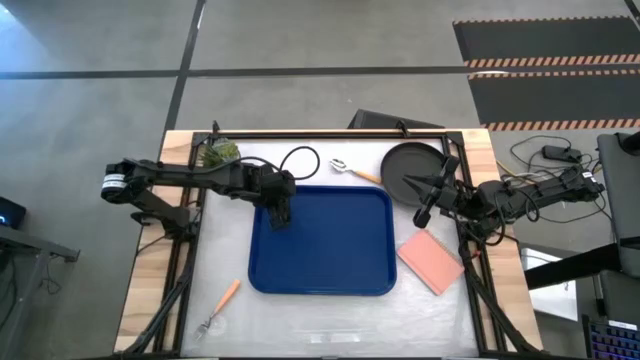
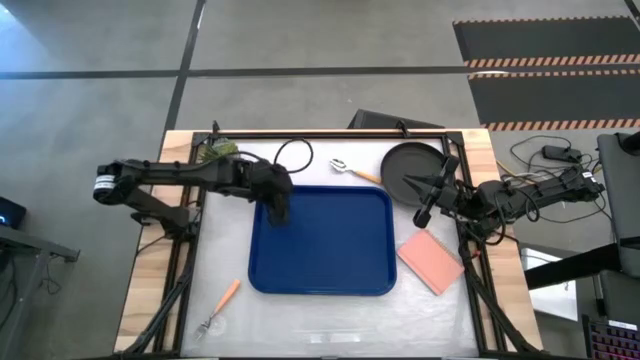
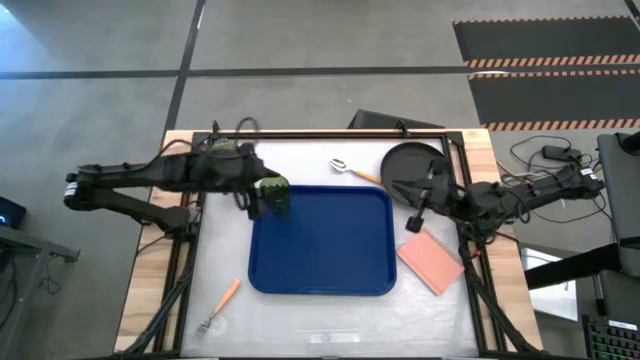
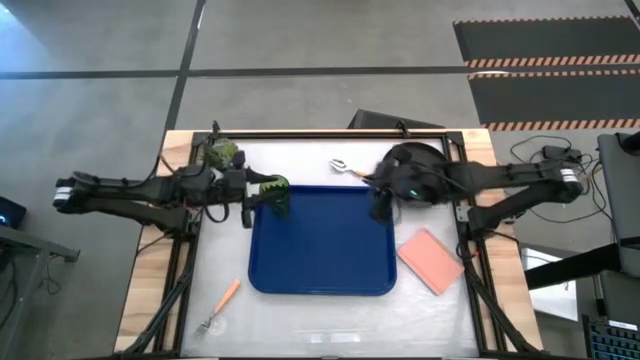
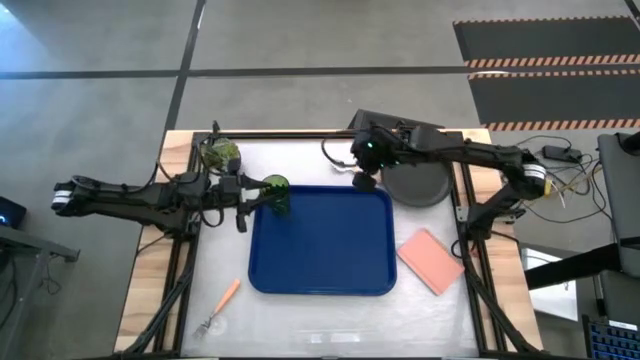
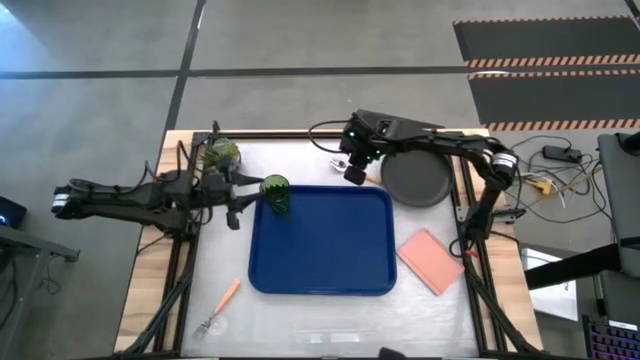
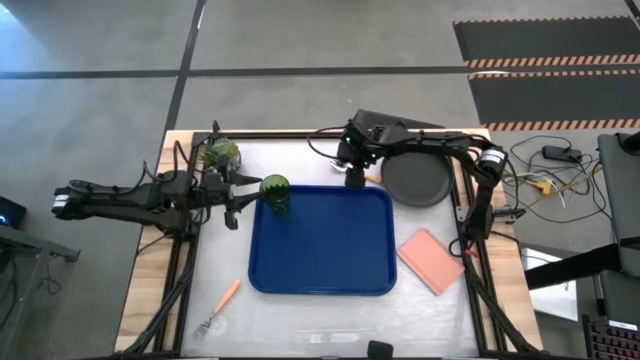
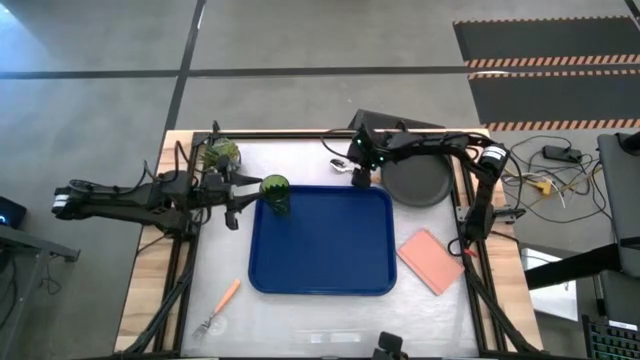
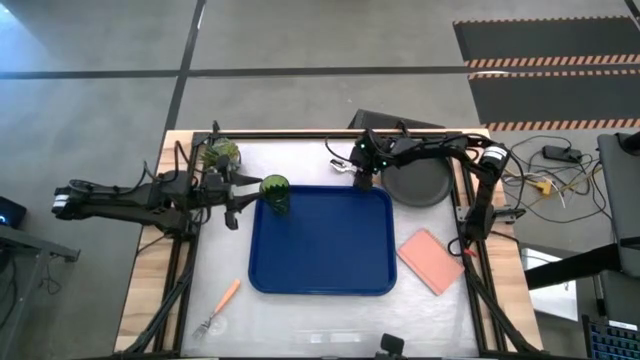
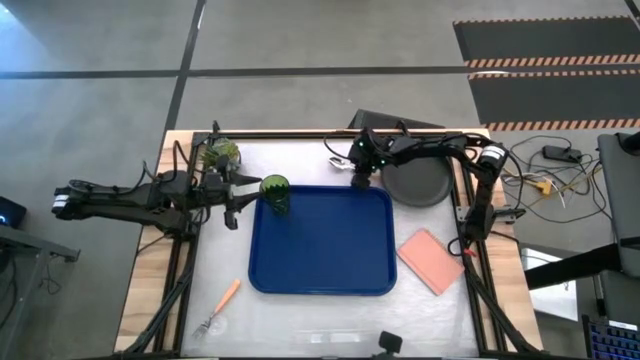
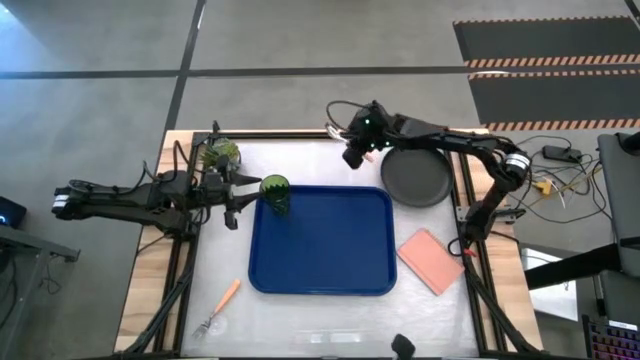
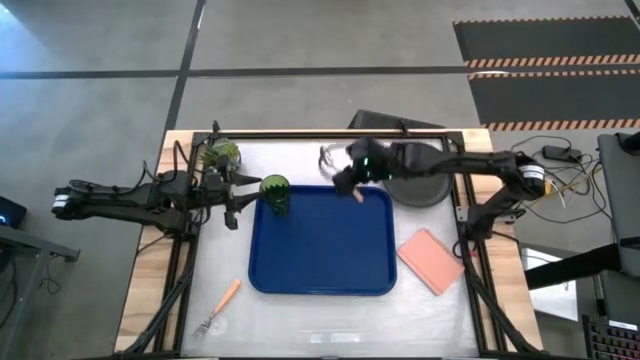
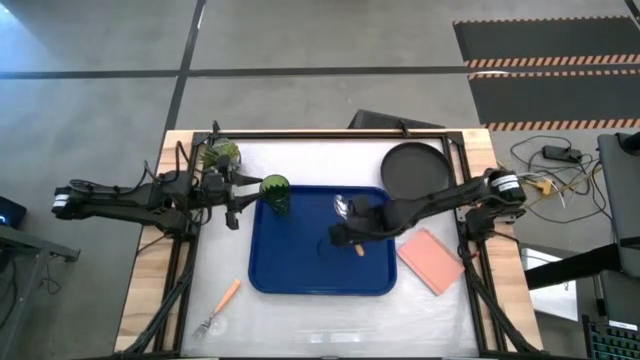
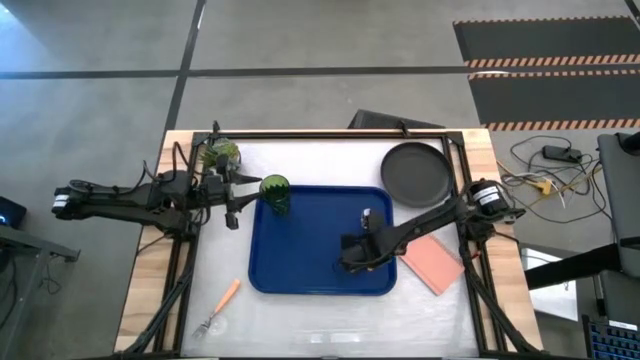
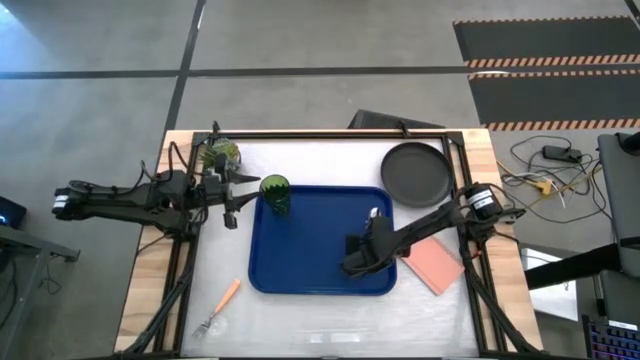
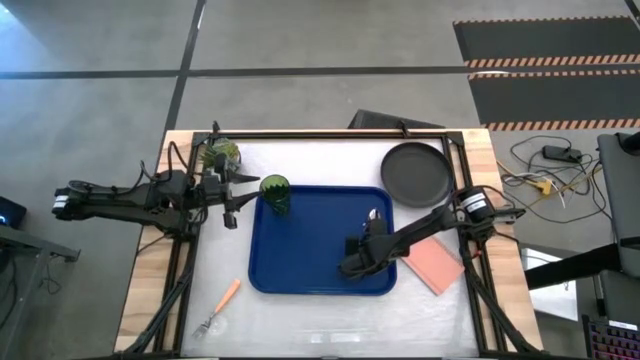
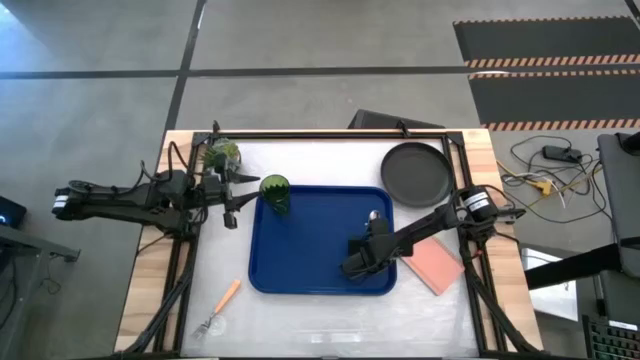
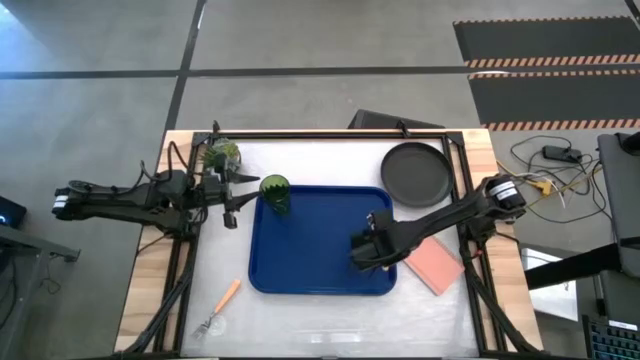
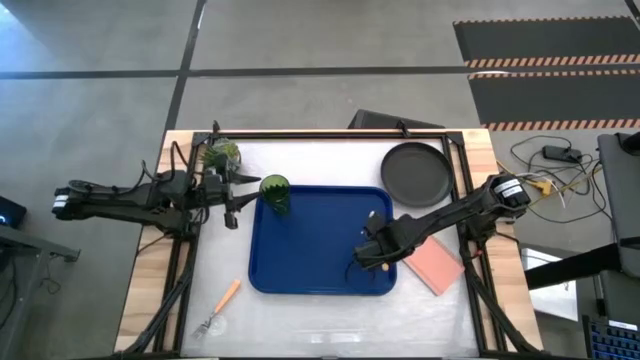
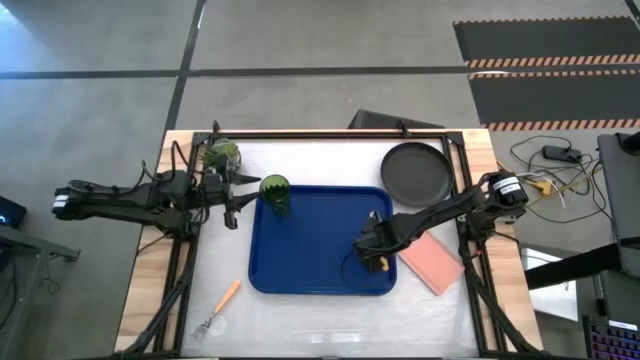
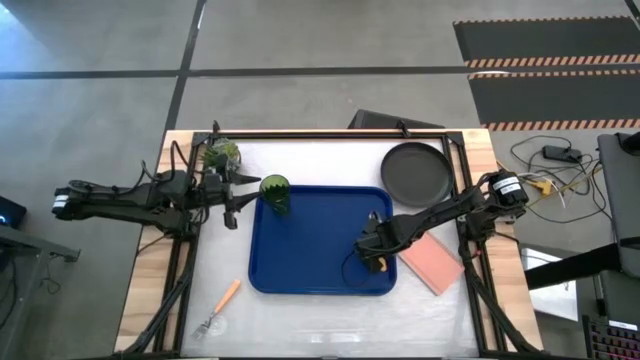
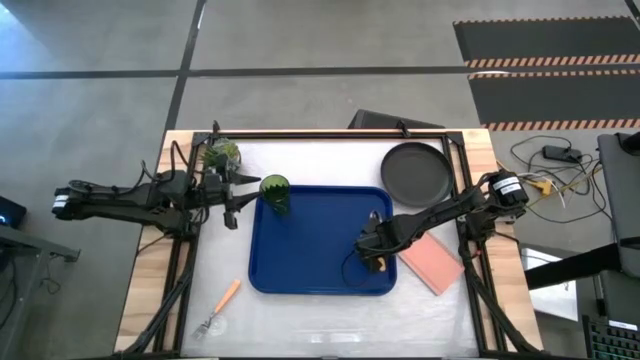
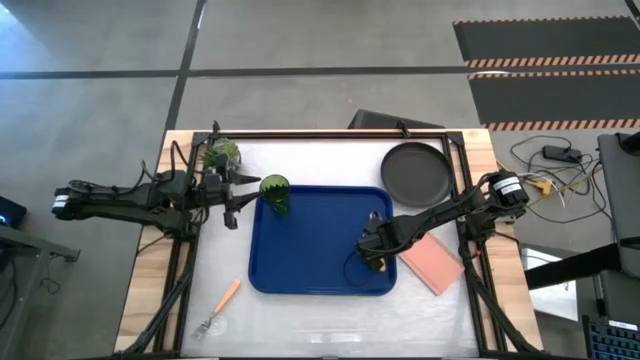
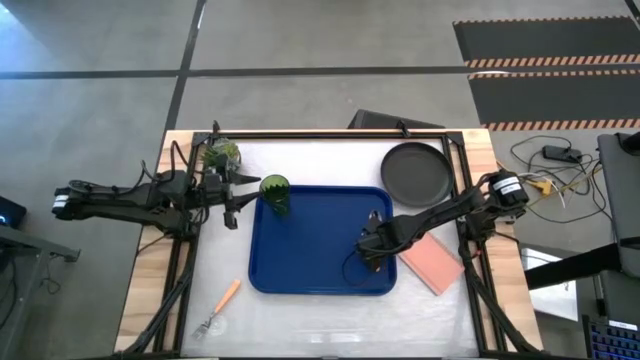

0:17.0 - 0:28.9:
Task: Pick and place plate/cup/fork/spoon on tray
Put the spoon on the blue tray

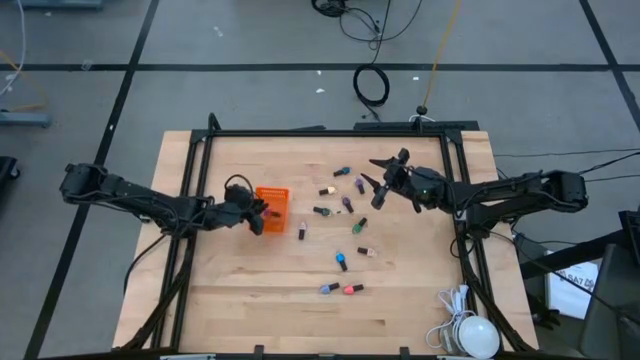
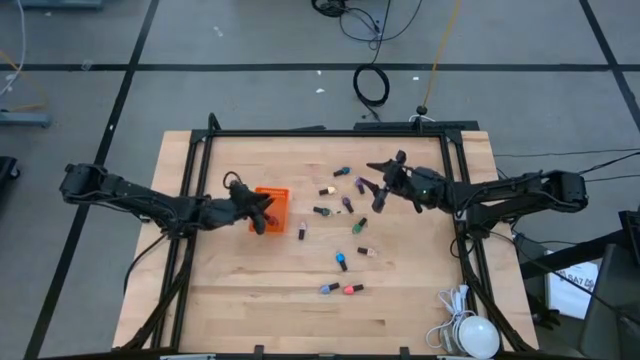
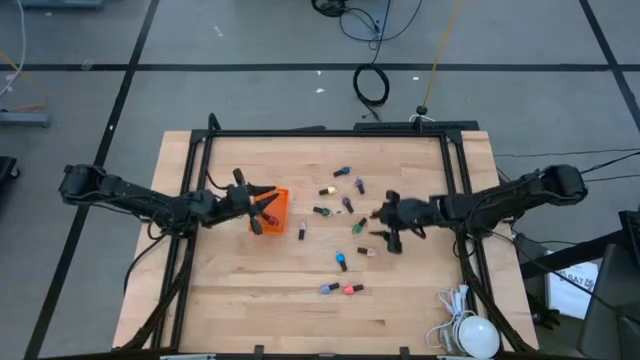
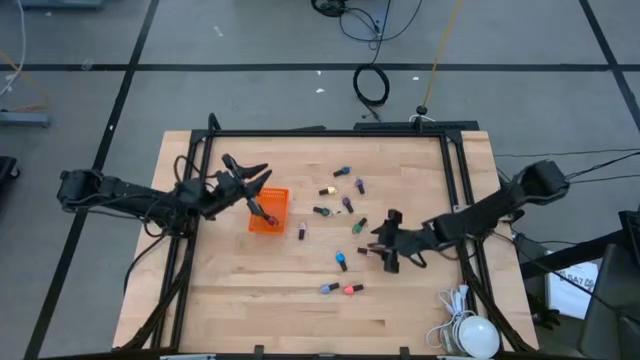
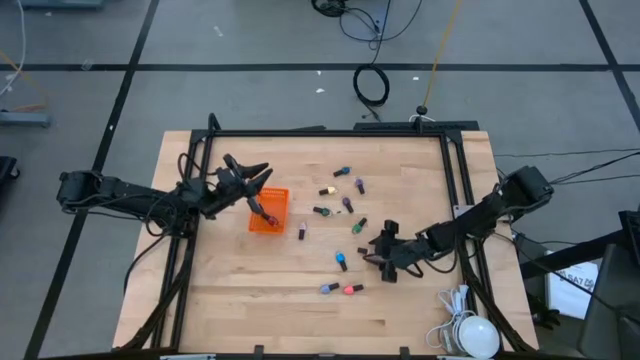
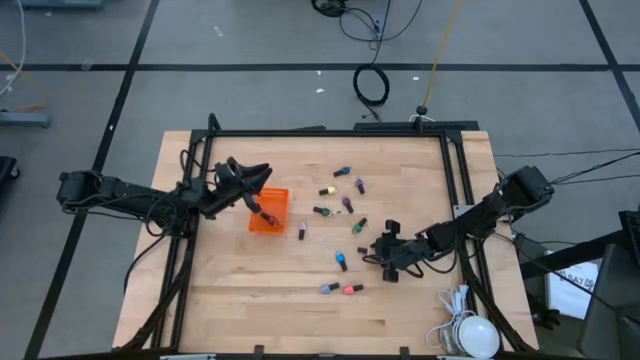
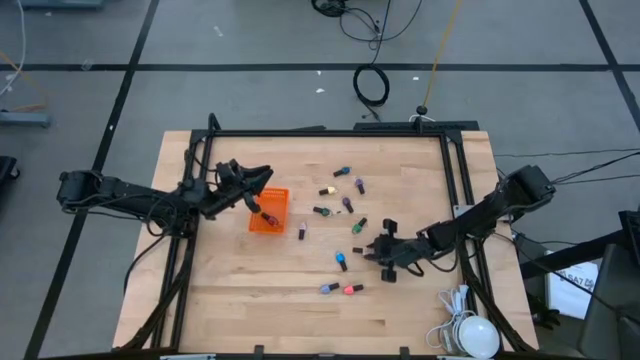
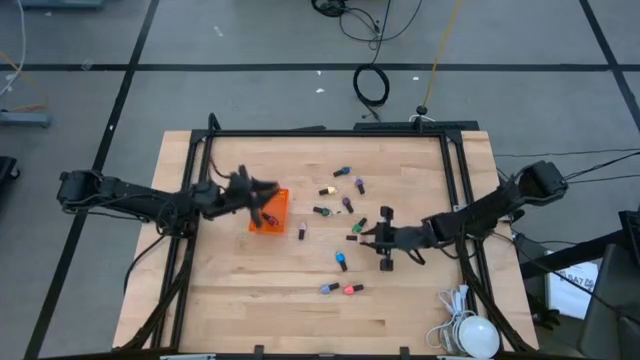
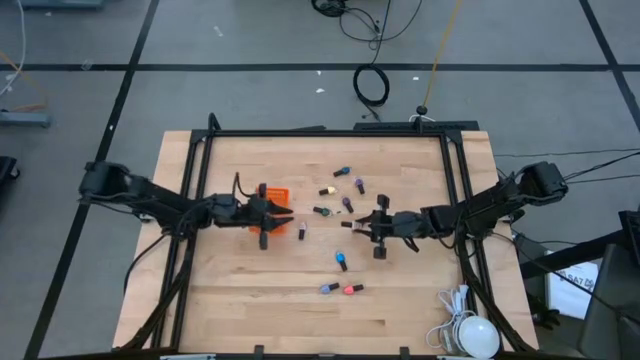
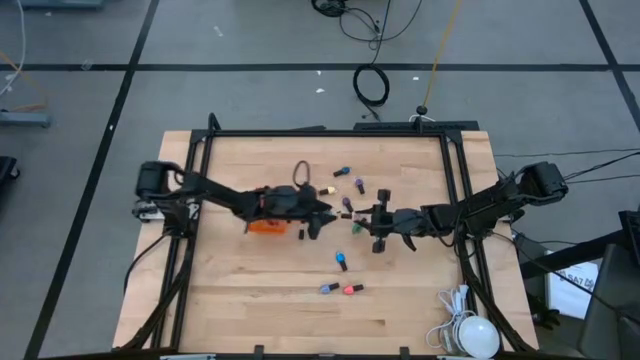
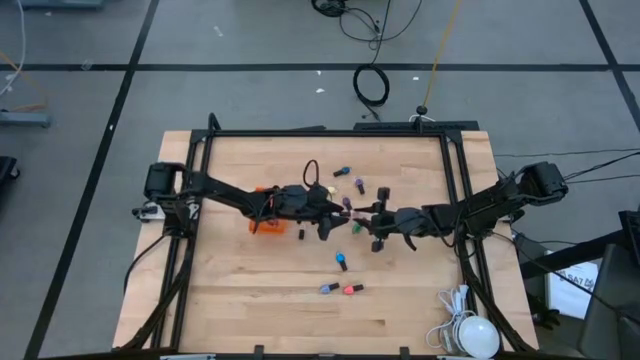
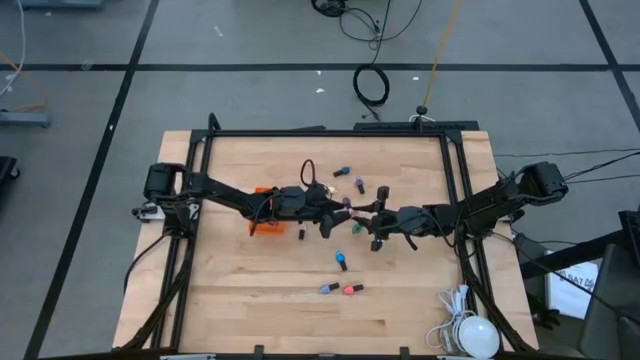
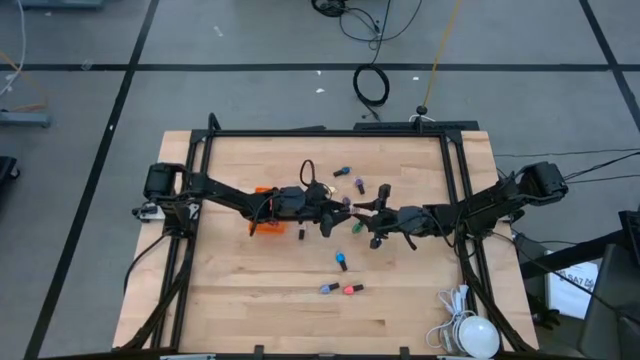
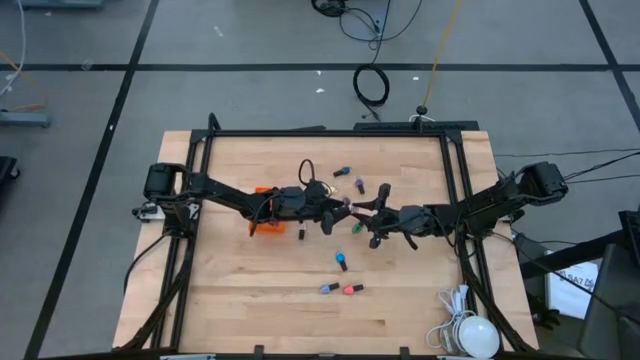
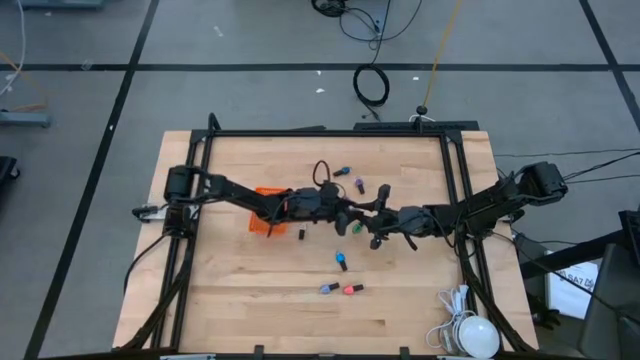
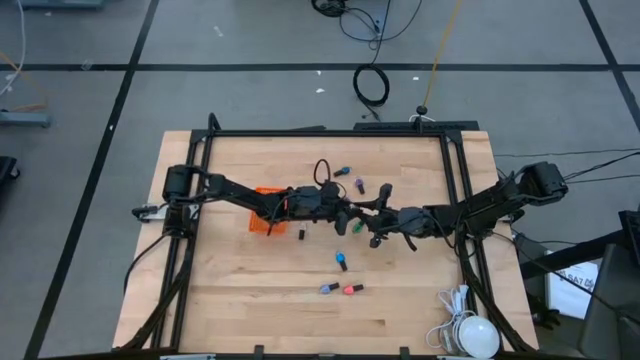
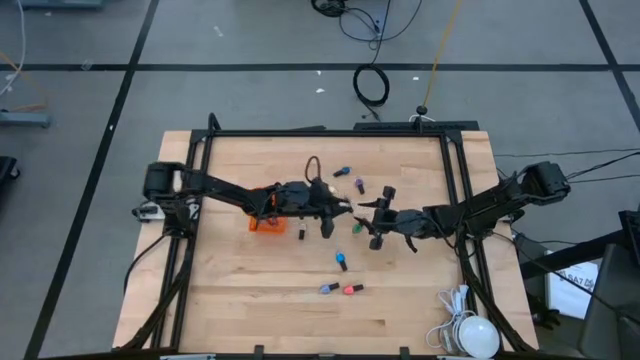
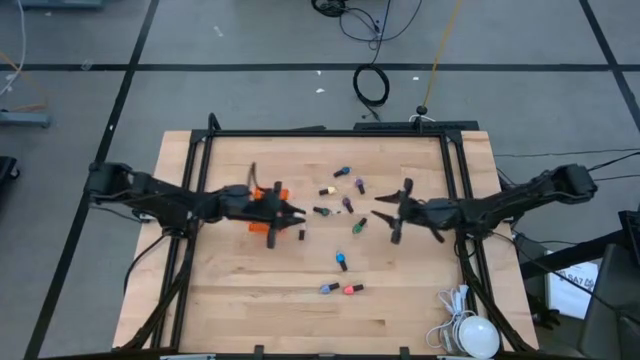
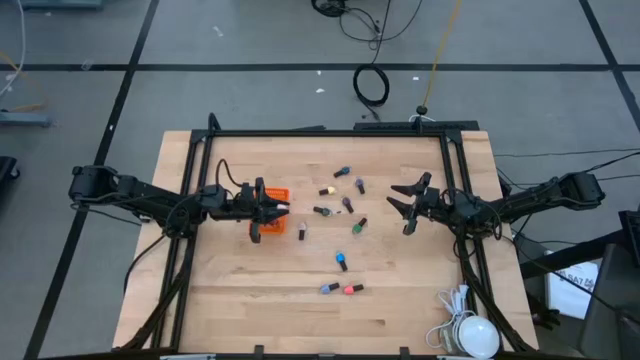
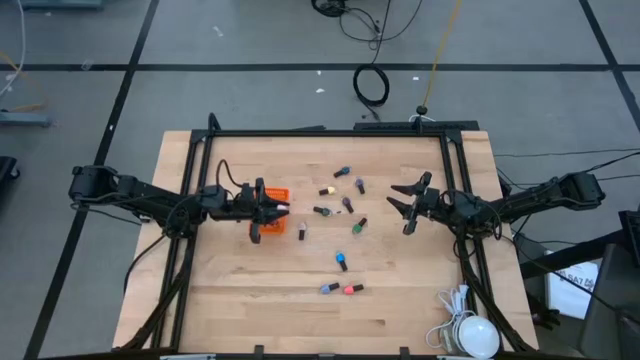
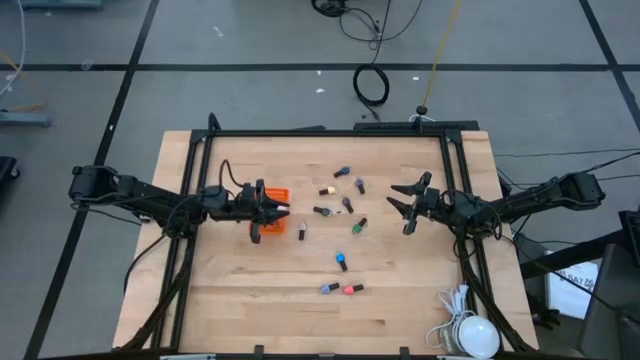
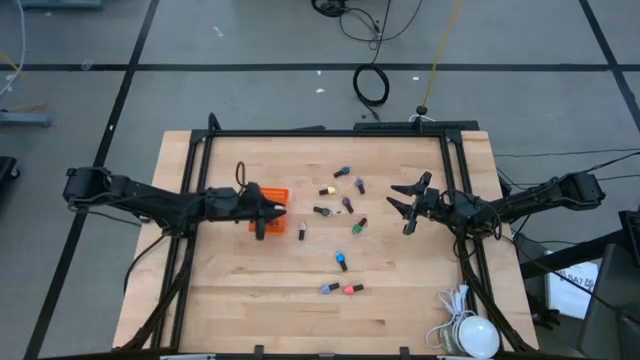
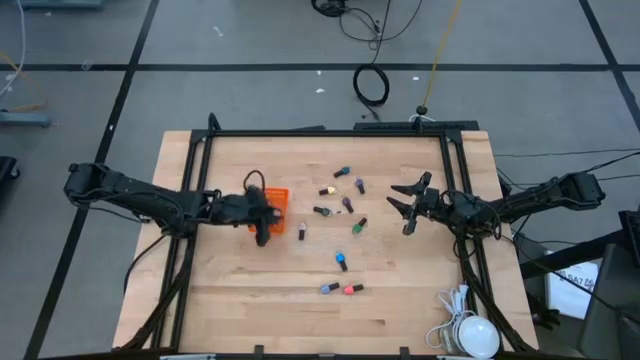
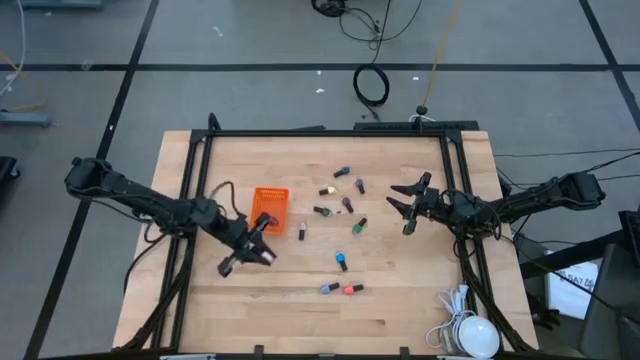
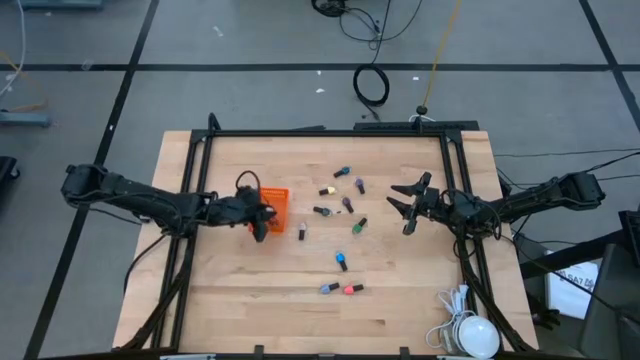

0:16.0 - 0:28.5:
Task: Pick & Place Nail Polish
Put the right brown nail polish into the orange basket
